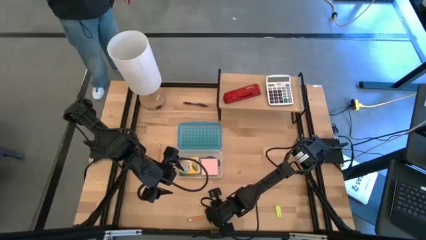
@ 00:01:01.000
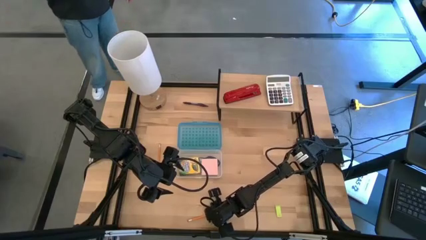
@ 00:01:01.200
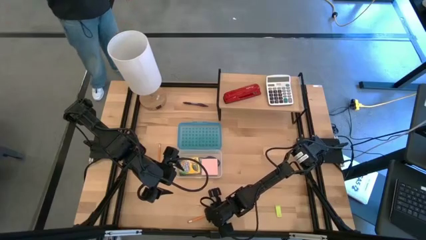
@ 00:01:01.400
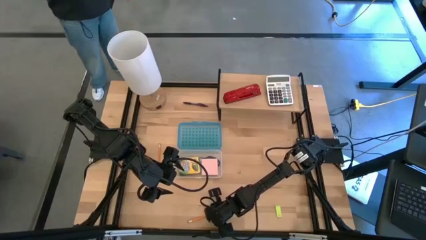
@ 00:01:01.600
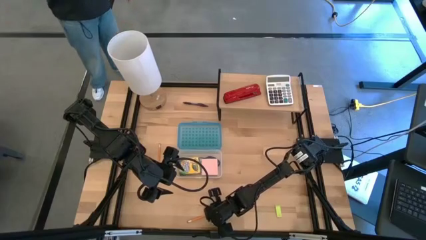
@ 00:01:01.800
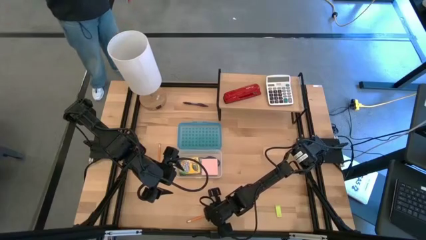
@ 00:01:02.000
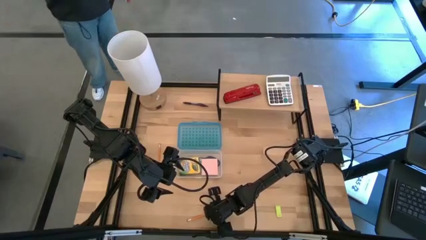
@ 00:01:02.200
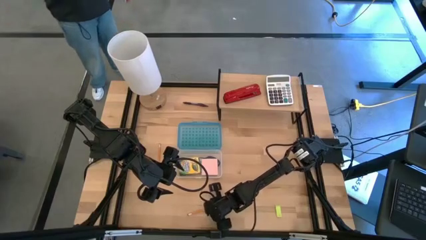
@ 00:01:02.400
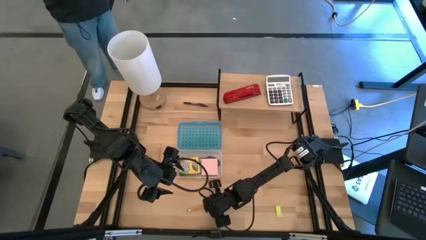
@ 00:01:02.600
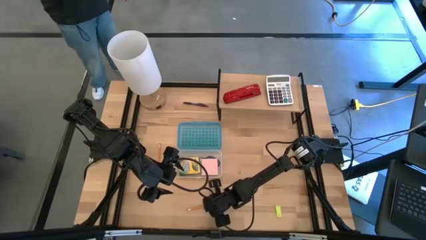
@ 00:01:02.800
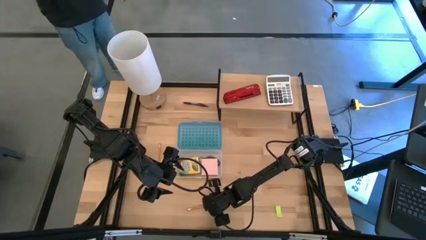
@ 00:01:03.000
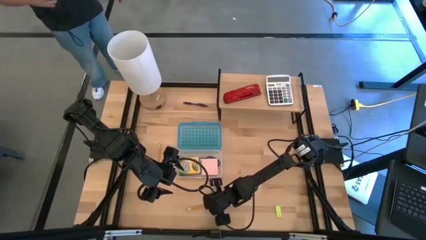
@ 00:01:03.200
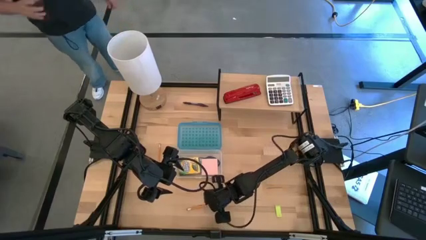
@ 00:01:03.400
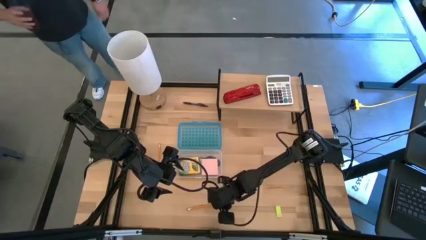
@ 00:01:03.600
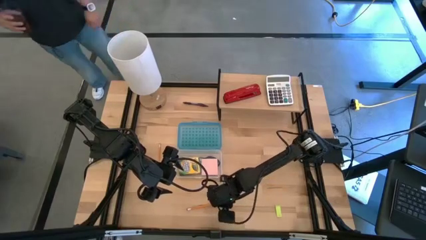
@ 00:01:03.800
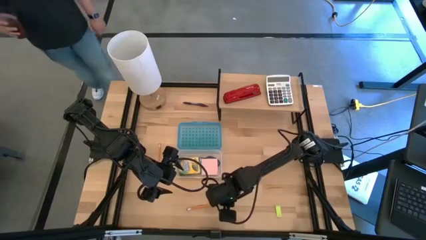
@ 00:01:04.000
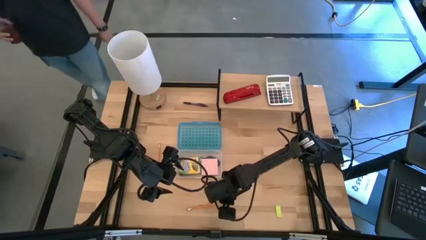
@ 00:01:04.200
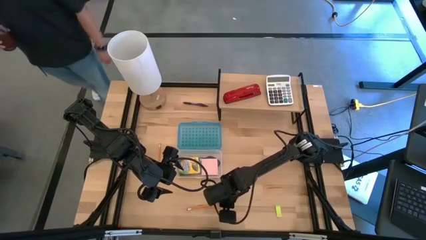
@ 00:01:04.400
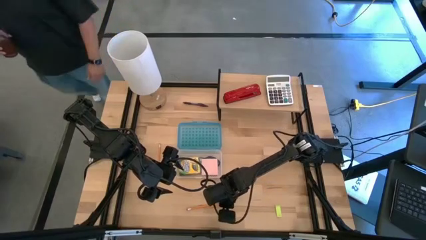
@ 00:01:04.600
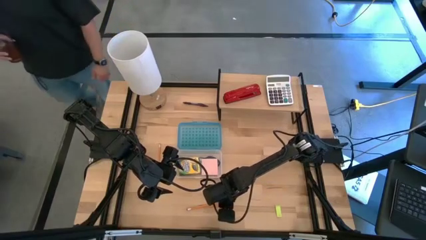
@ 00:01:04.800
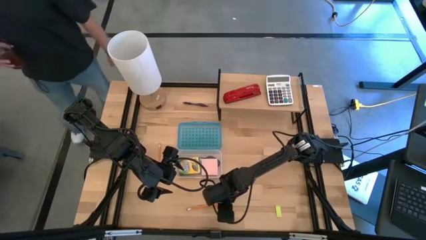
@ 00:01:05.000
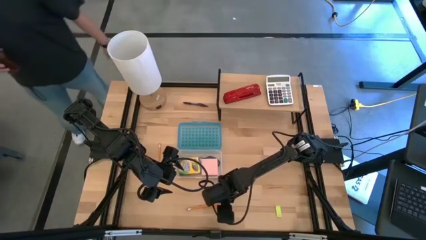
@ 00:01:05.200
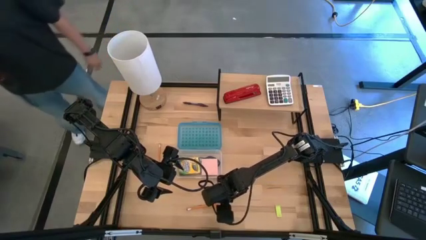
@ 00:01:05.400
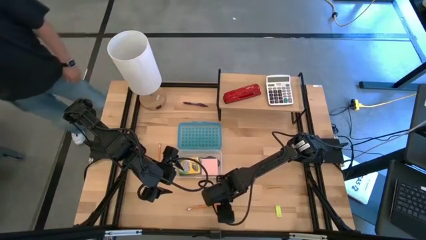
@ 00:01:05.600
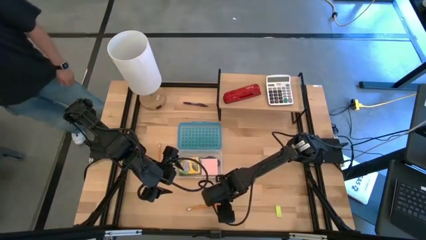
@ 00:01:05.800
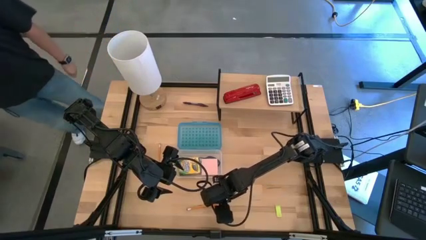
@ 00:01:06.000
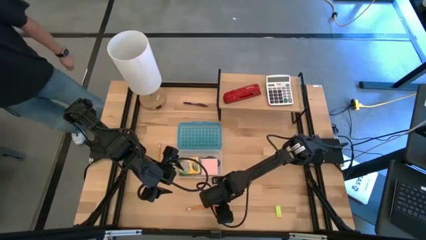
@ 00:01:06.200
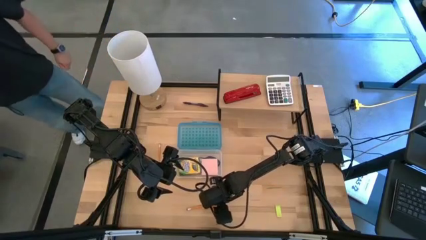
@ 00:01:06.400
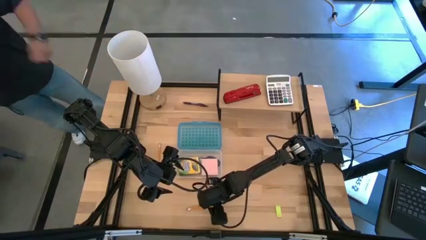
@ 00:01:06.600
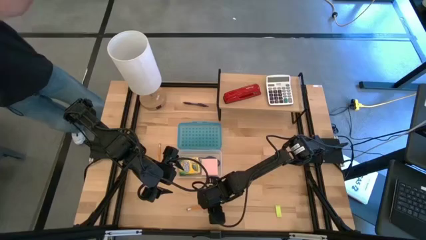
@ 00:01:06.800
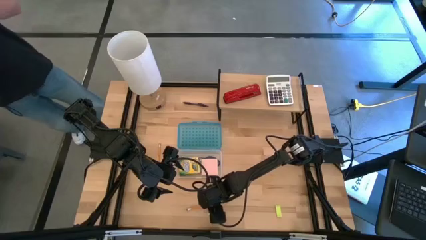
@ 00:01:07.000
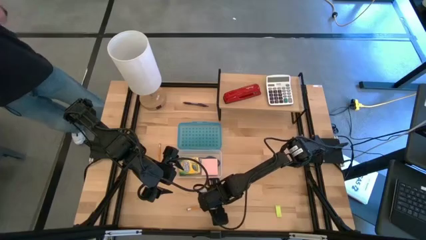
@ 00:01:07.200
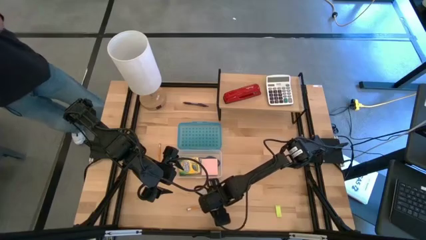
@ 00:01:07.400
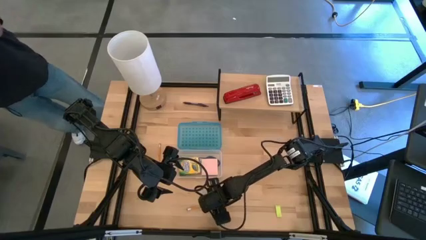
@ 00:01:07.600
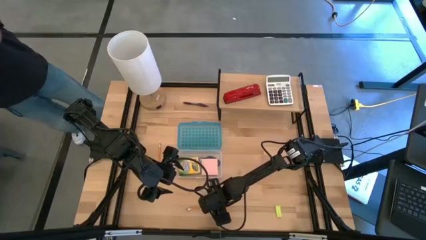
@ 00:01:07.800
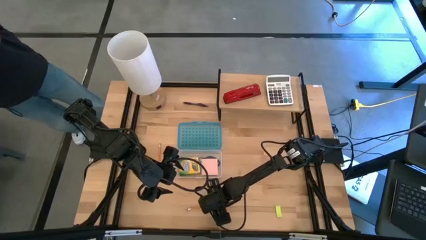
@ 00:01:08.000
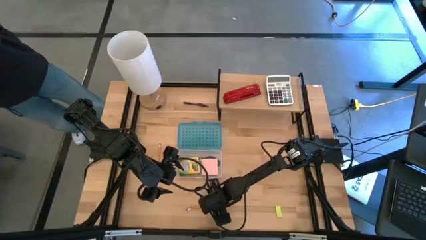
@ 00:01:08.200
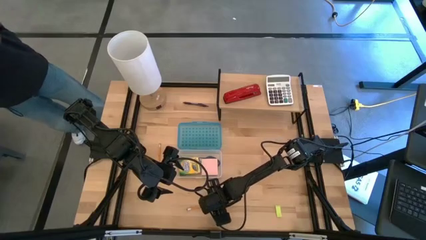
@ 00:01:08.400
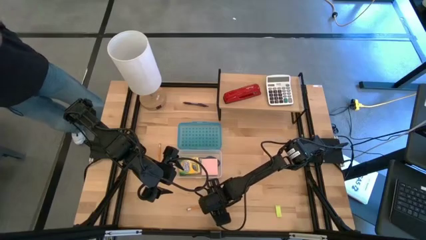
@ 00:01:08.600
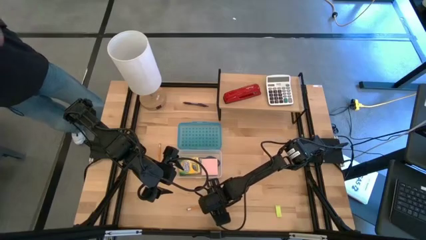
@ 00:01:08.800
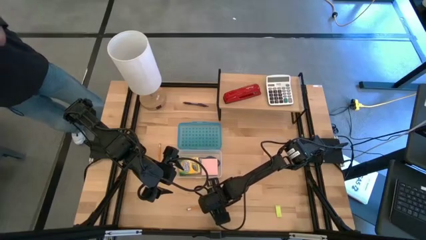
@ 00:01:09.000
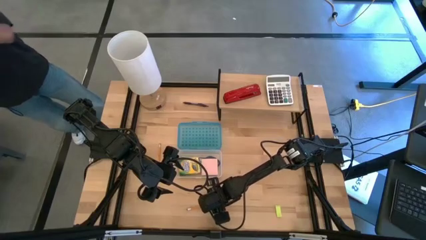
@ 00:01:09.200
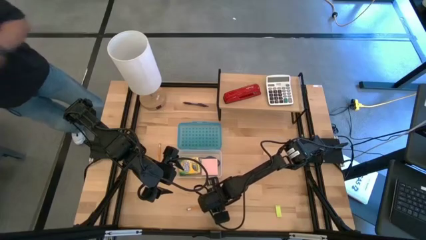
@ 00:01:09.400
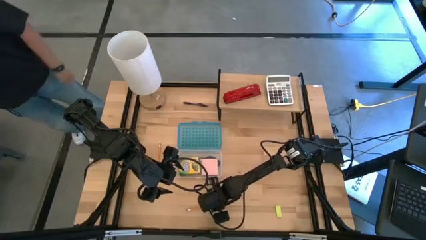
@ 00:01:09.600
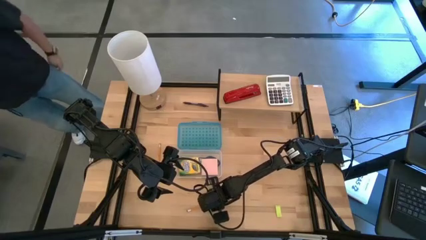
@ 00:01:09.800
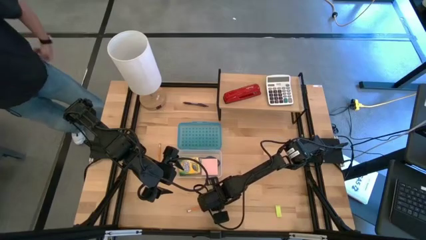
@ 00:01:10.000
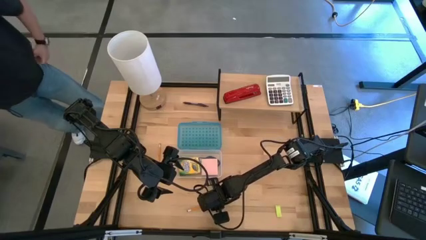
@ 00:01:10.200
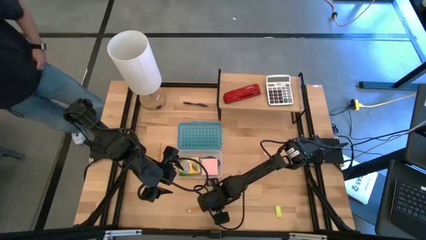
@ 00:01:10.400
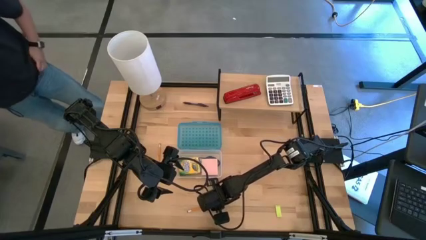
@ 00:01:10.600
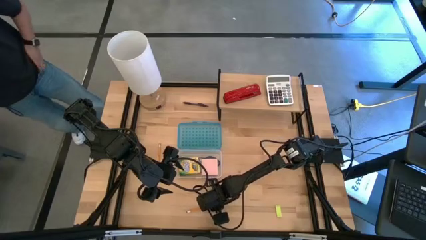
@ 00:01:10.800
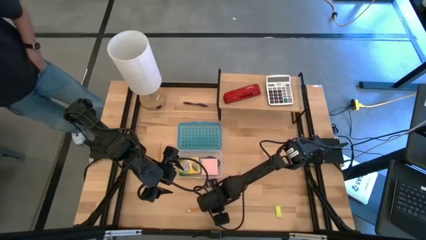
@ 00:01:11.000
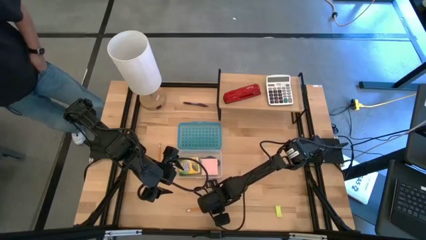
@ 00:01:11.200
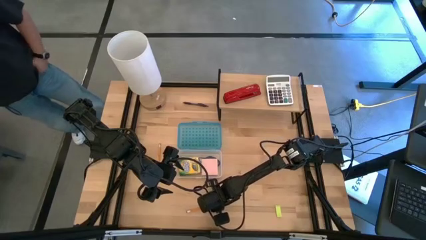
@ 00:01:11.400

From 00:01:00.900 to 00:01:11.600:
Task: Pack school essentials
Put the yellow pencil into the blue supply box

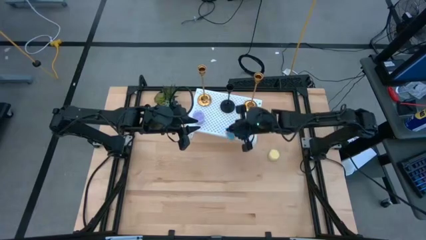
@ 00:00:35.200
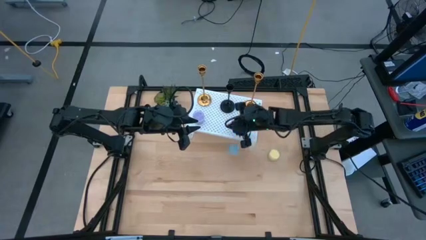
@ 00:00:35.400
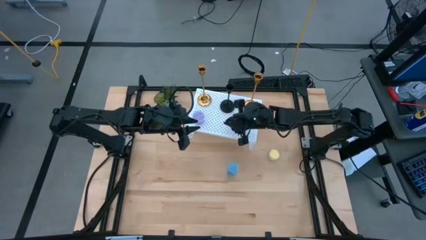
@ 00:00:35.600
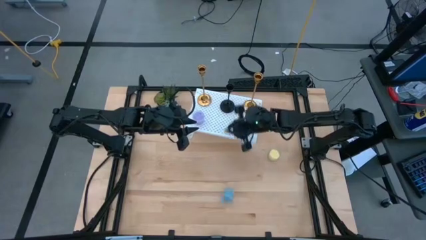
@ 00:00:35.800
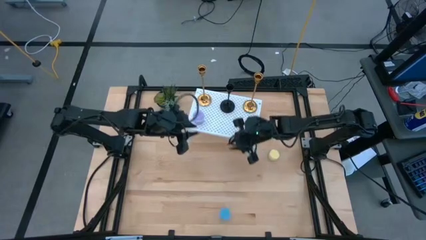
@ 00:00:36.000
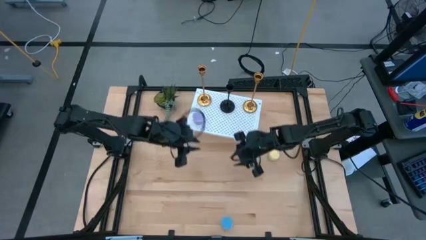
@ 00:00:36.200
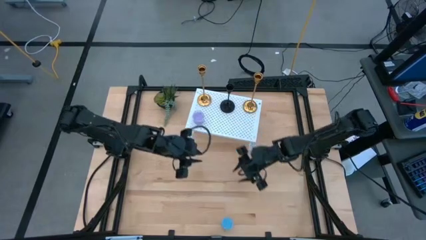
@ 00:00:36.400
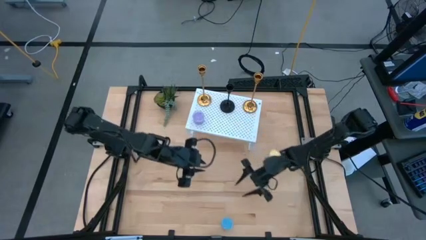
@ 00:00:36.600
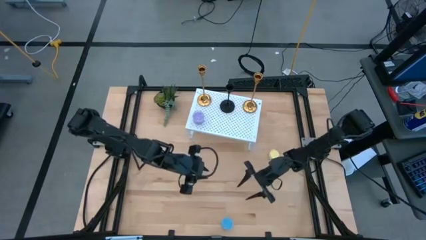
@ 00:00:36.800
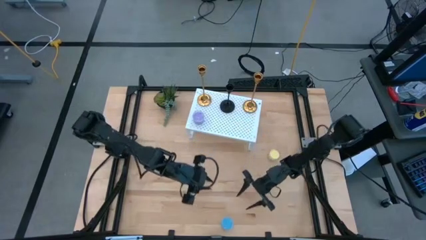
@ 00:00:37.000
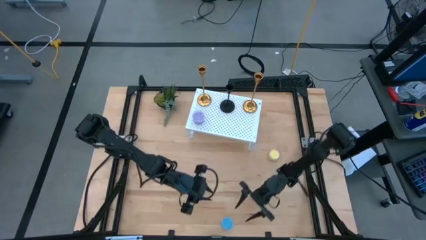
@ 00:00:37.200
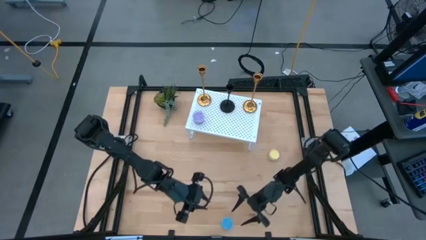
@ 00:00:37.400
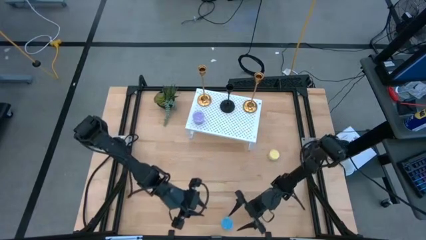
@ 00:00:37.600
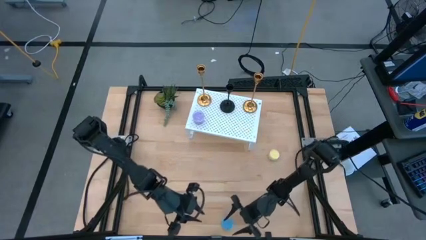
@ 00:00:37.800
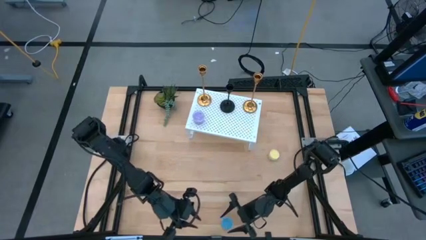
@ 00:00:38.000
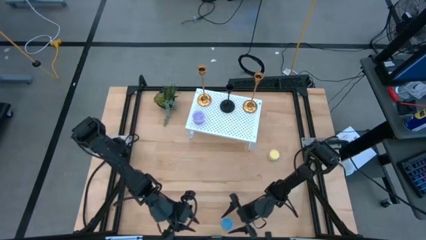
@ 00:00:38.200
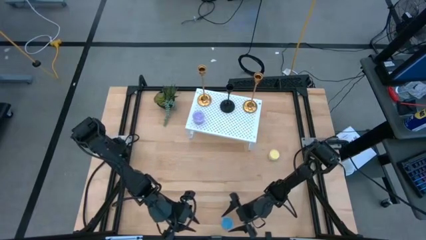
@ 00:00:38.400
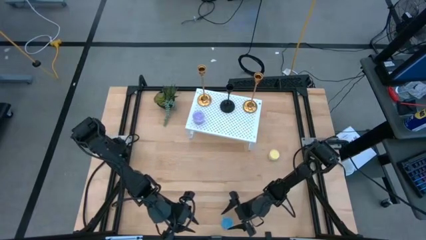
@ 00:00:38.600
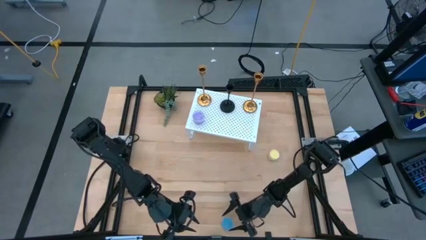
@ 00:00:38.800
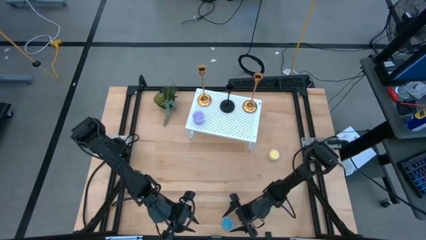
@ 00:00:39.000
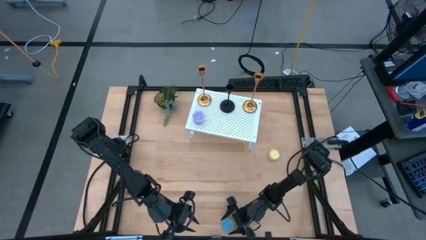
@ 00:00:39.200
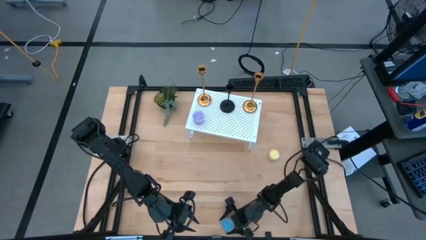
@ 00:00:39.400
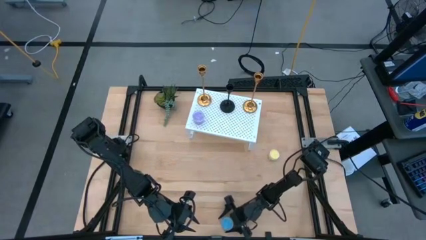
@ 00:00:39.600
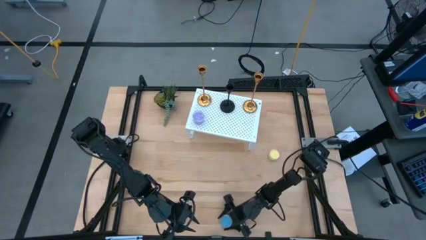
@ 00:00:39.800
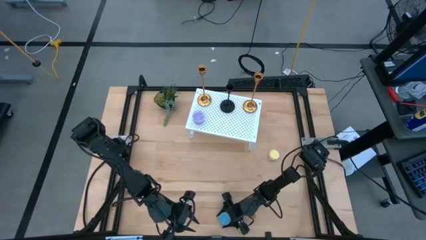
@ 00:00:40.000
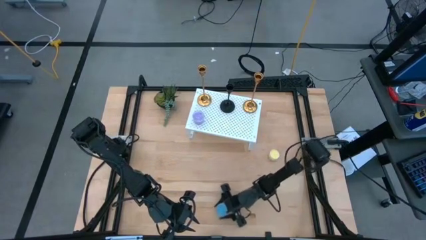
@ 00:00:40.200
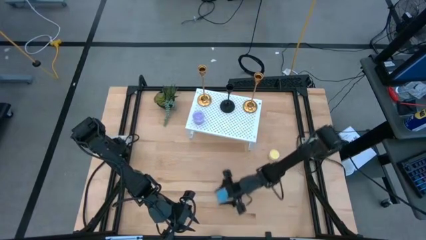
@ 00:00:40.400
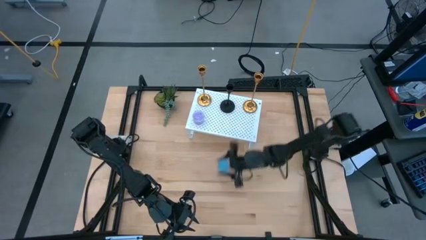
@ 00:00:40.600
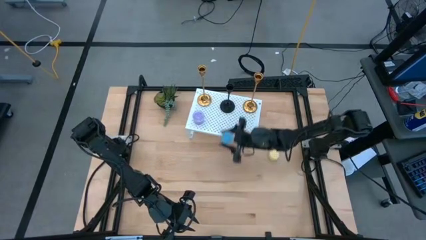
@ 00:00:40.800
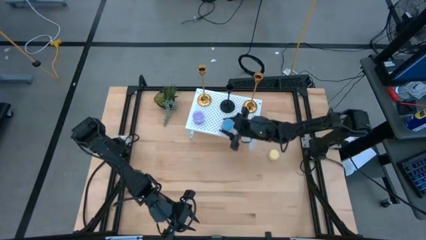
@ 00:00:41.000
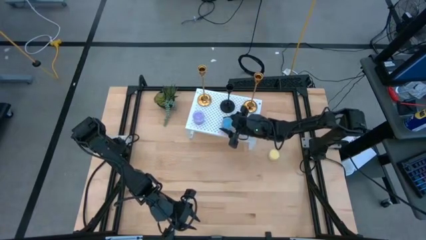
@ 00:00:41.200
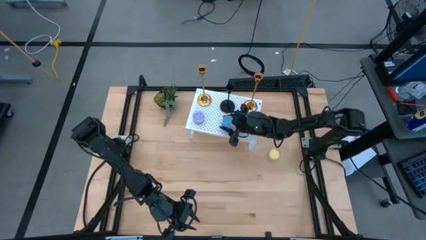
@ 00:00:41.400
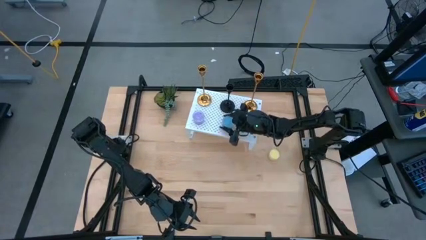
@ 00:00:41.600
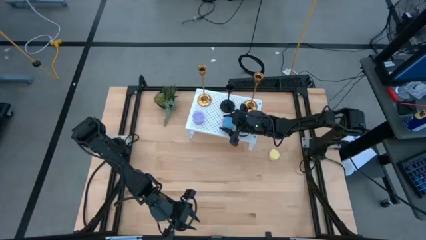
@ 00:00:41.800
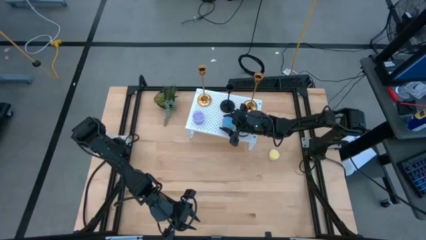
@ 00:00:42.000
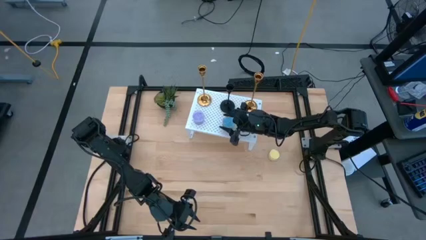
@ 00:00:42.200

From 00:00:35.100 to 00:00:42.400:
Task: Pick & Place candle stick holders
Put the blue candle on the shelf aligned with the violet candle on the shelf
